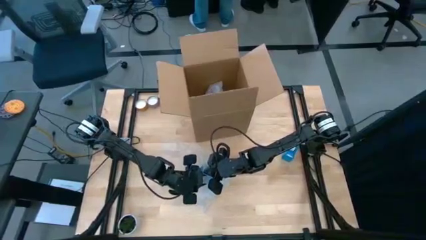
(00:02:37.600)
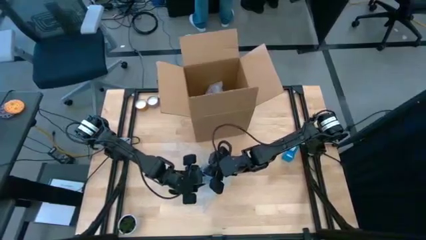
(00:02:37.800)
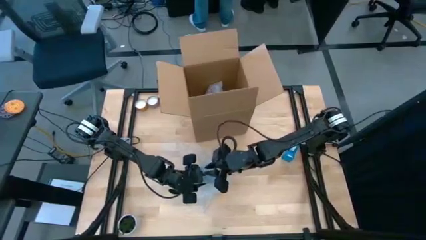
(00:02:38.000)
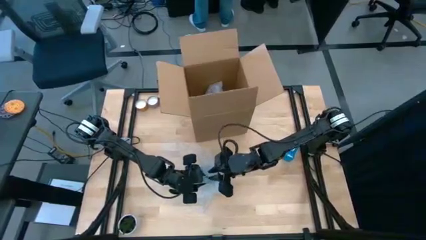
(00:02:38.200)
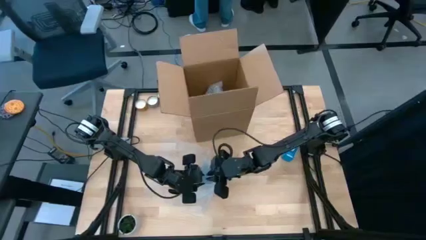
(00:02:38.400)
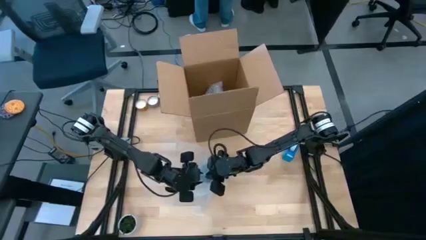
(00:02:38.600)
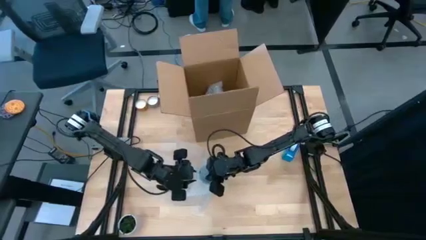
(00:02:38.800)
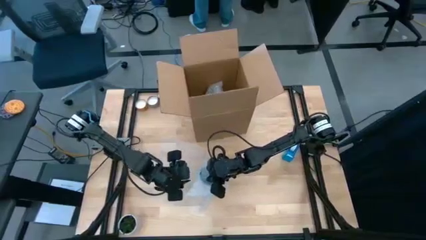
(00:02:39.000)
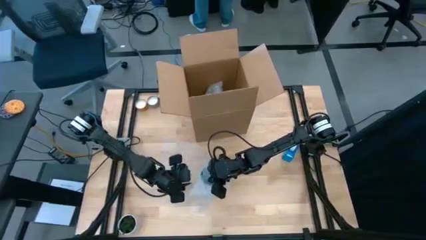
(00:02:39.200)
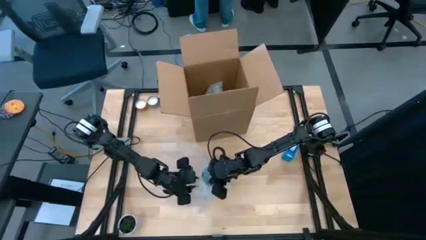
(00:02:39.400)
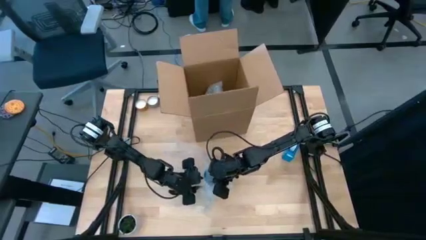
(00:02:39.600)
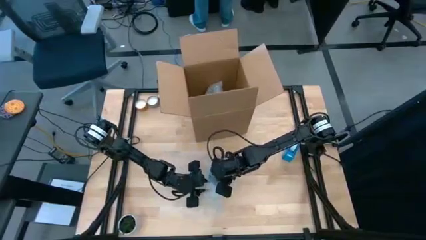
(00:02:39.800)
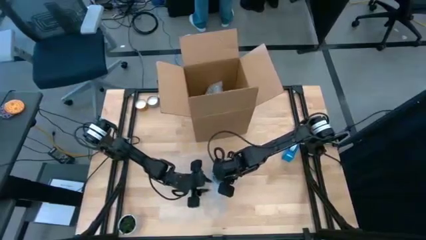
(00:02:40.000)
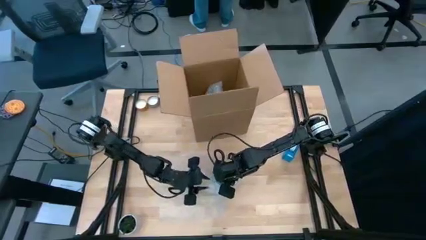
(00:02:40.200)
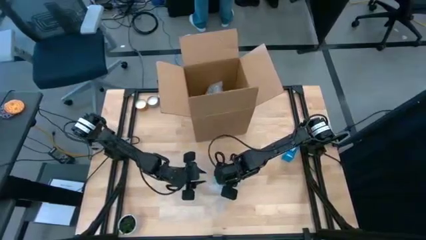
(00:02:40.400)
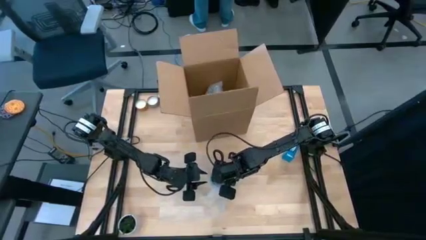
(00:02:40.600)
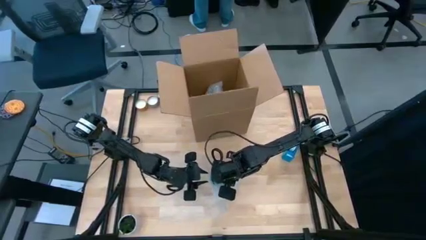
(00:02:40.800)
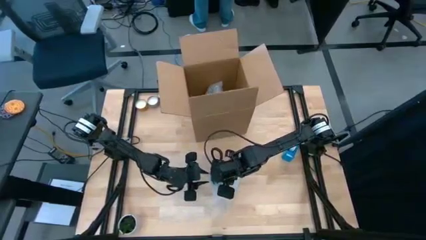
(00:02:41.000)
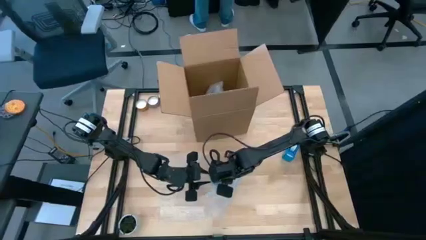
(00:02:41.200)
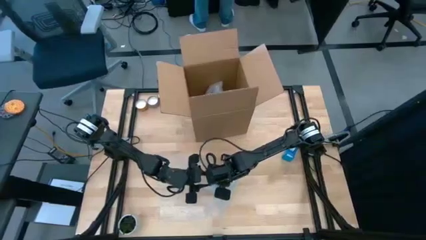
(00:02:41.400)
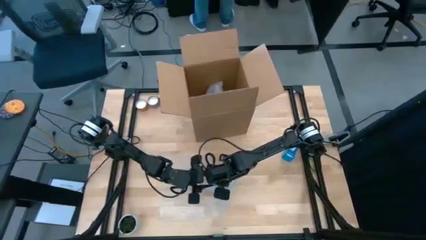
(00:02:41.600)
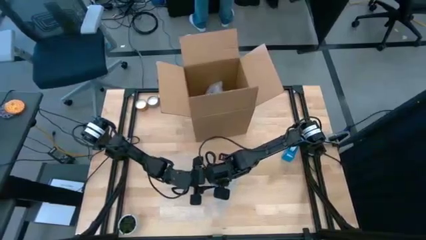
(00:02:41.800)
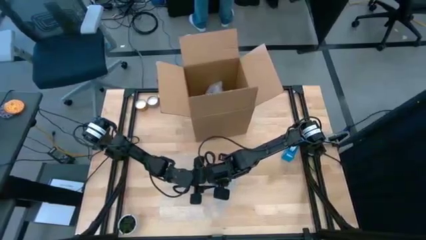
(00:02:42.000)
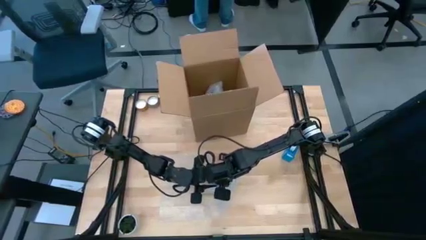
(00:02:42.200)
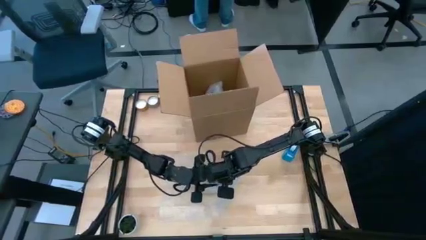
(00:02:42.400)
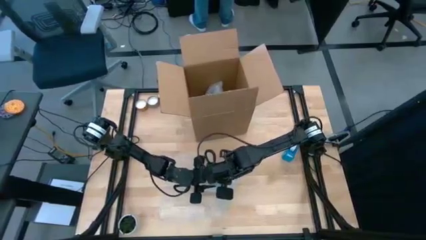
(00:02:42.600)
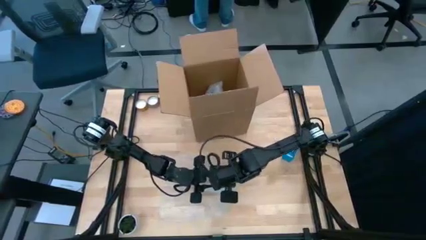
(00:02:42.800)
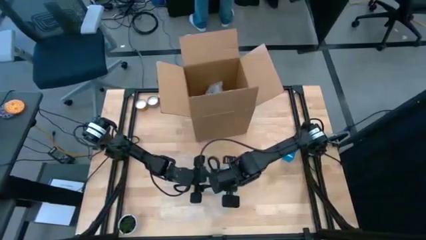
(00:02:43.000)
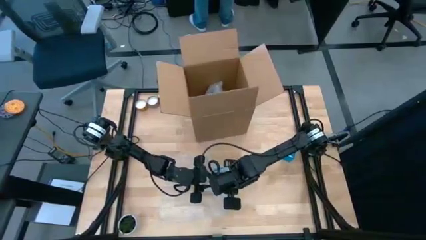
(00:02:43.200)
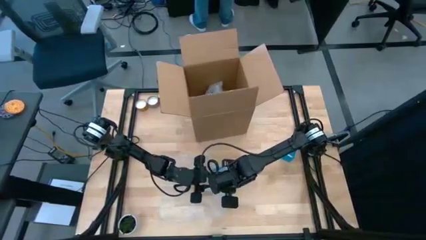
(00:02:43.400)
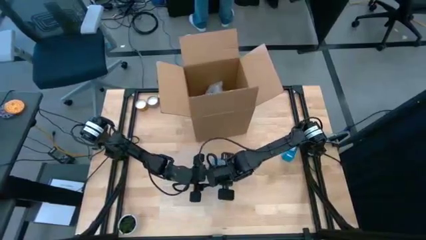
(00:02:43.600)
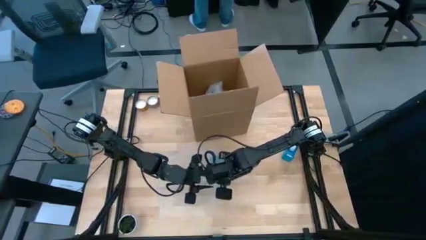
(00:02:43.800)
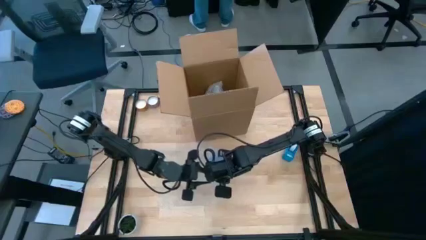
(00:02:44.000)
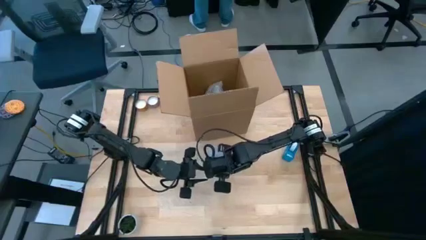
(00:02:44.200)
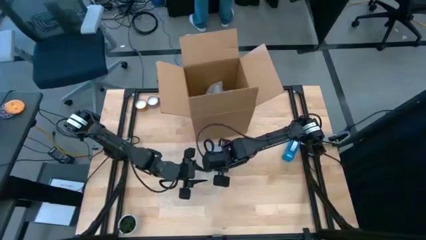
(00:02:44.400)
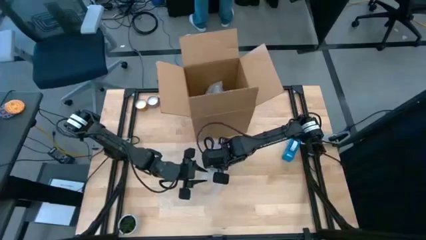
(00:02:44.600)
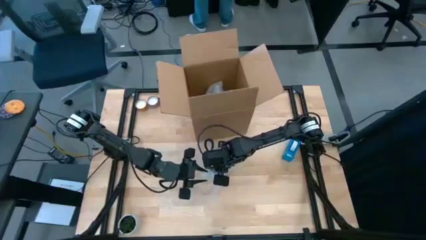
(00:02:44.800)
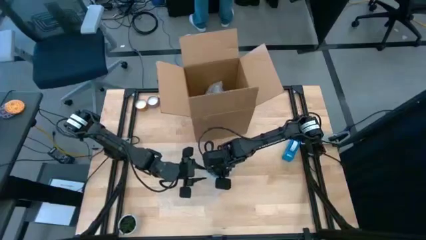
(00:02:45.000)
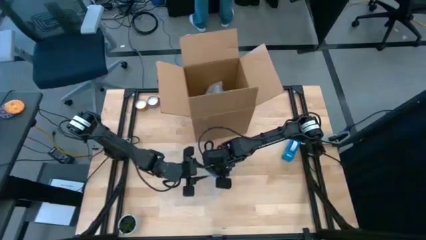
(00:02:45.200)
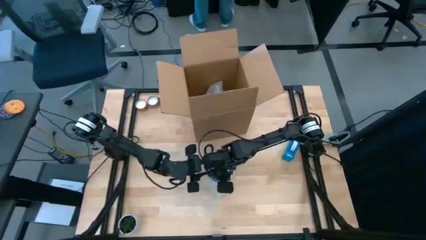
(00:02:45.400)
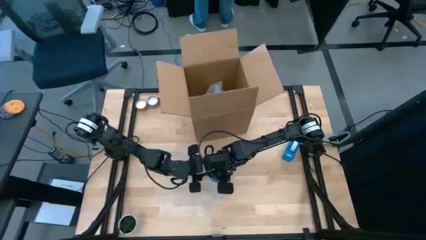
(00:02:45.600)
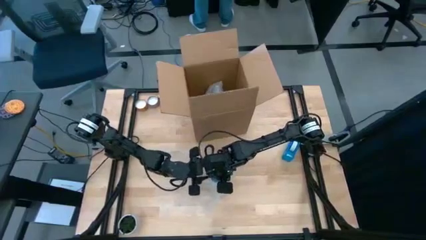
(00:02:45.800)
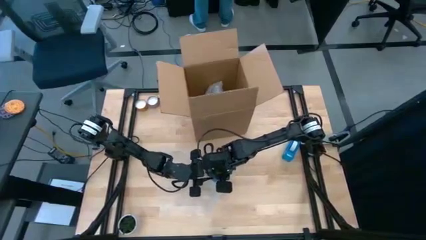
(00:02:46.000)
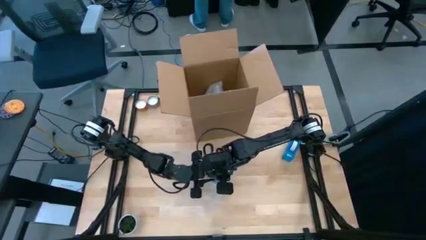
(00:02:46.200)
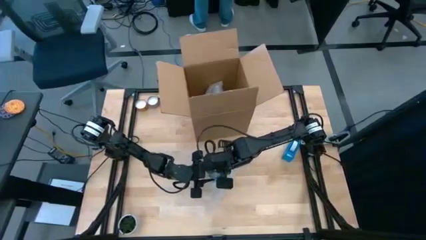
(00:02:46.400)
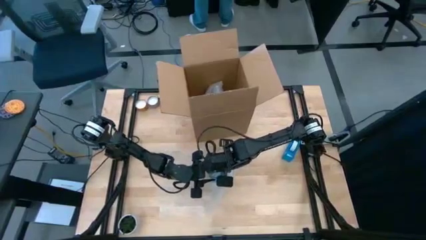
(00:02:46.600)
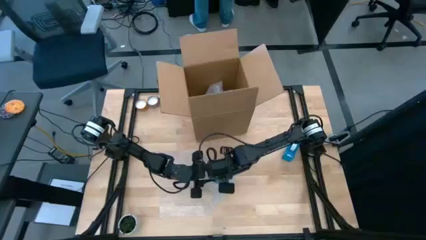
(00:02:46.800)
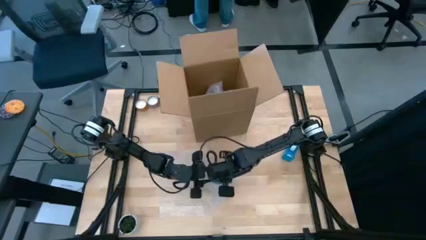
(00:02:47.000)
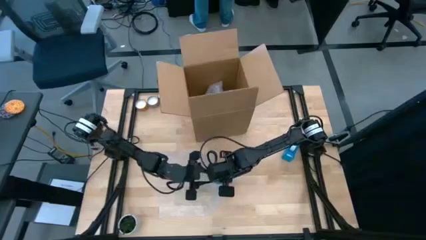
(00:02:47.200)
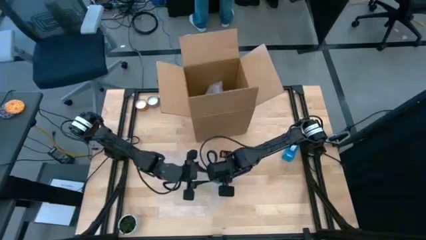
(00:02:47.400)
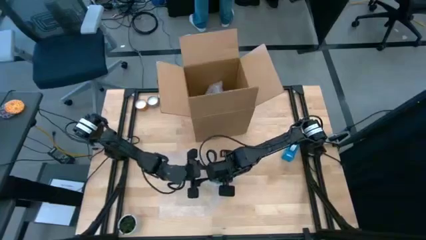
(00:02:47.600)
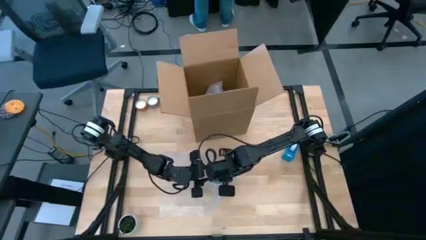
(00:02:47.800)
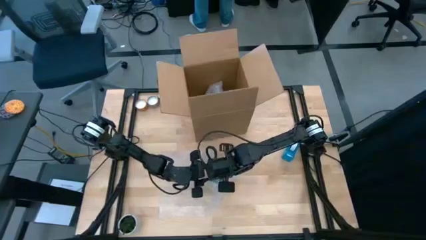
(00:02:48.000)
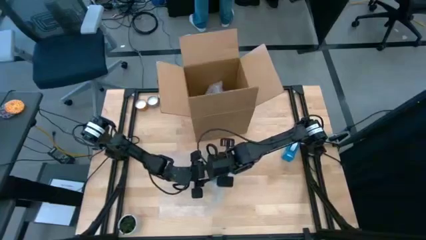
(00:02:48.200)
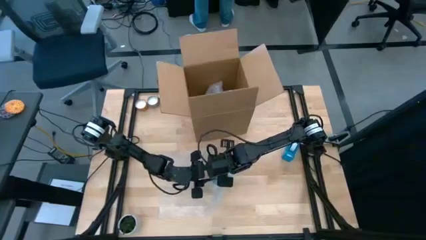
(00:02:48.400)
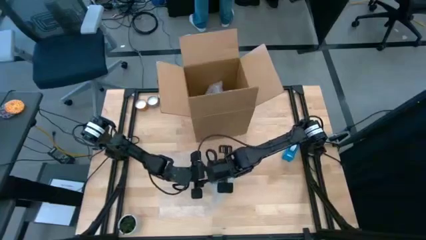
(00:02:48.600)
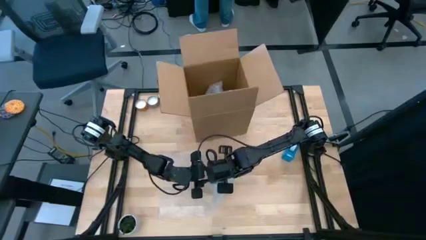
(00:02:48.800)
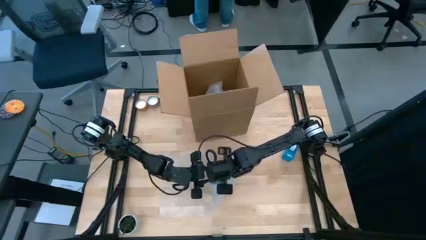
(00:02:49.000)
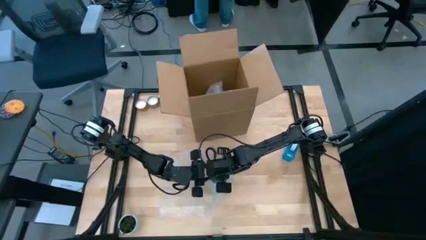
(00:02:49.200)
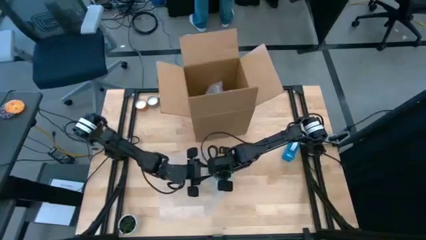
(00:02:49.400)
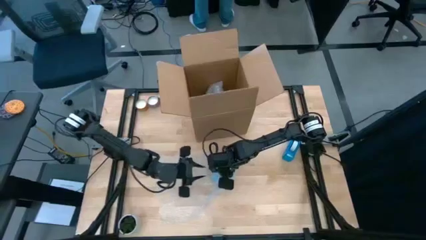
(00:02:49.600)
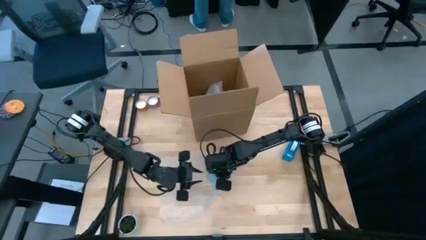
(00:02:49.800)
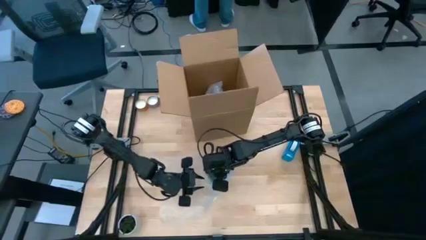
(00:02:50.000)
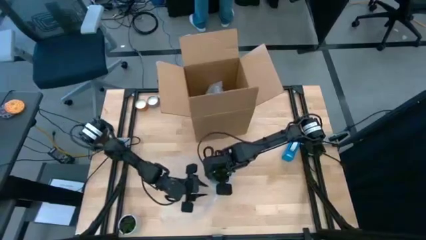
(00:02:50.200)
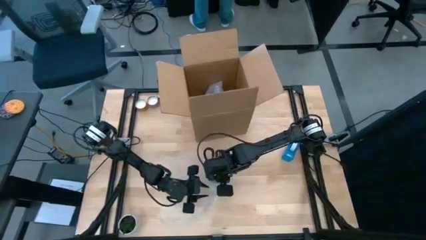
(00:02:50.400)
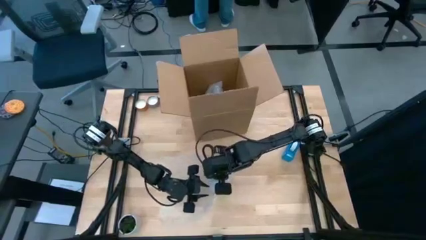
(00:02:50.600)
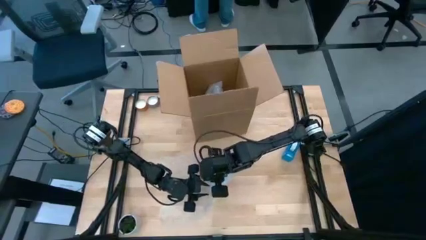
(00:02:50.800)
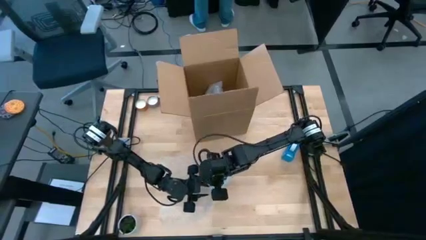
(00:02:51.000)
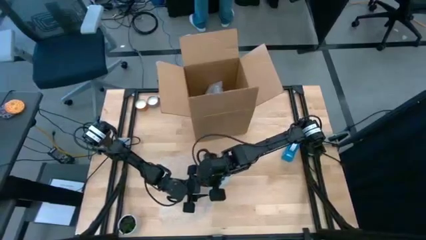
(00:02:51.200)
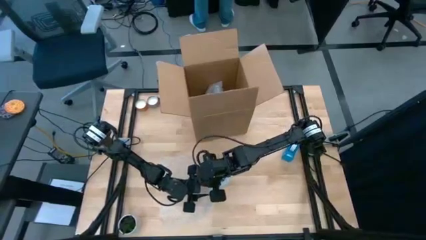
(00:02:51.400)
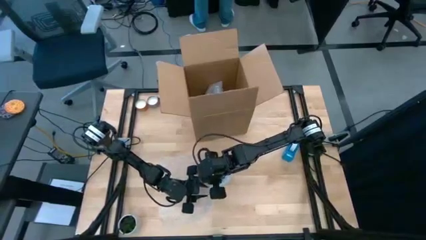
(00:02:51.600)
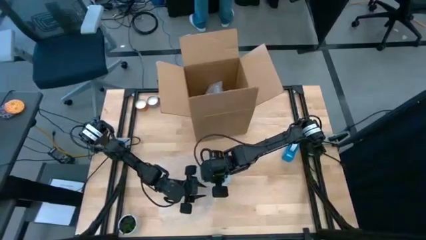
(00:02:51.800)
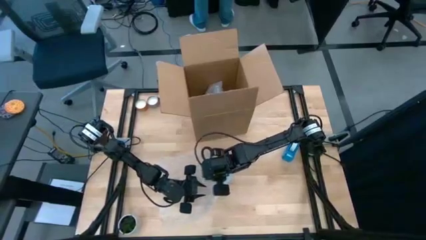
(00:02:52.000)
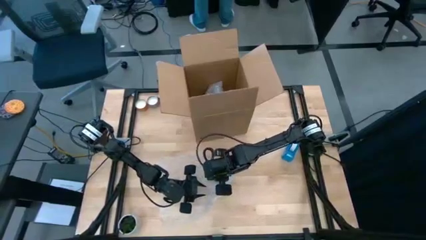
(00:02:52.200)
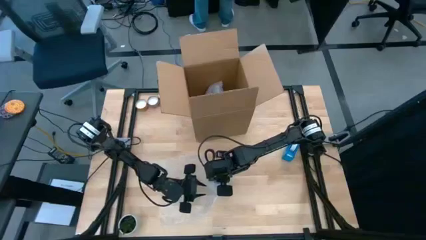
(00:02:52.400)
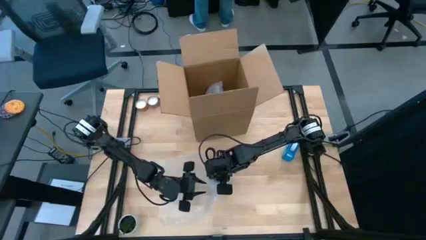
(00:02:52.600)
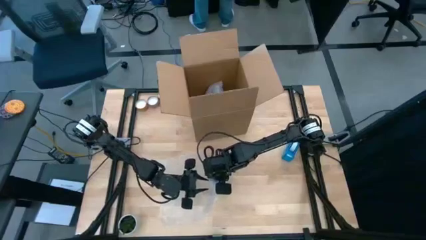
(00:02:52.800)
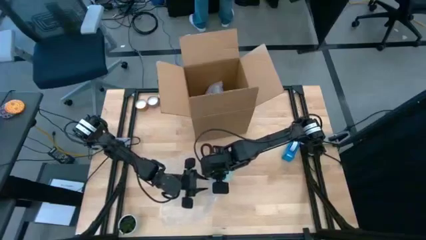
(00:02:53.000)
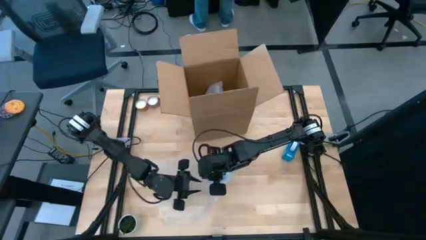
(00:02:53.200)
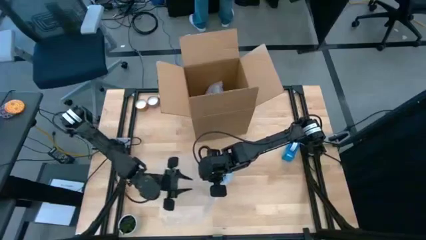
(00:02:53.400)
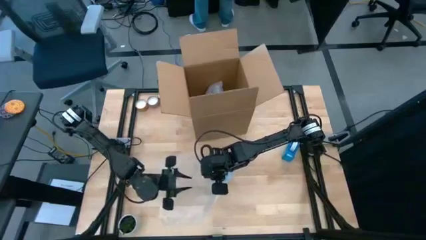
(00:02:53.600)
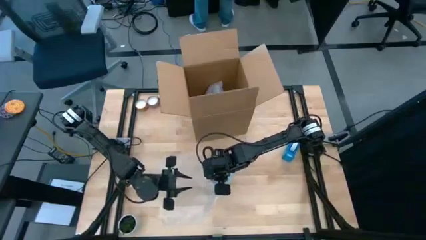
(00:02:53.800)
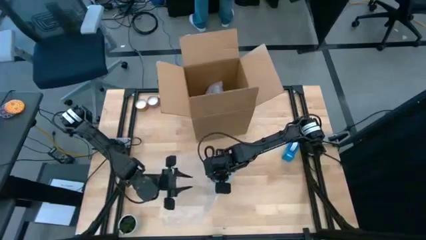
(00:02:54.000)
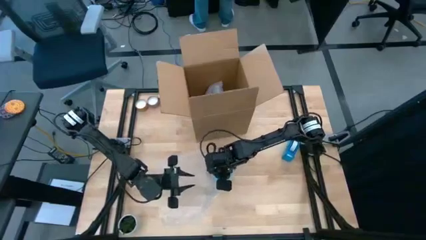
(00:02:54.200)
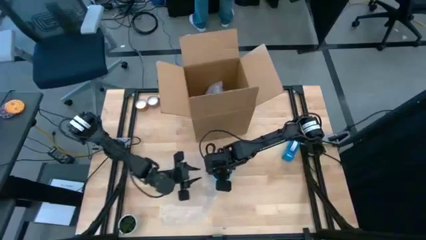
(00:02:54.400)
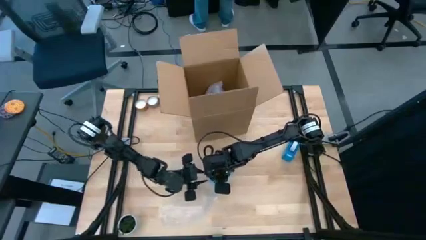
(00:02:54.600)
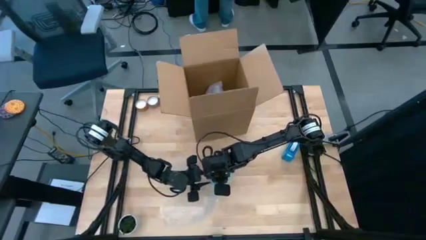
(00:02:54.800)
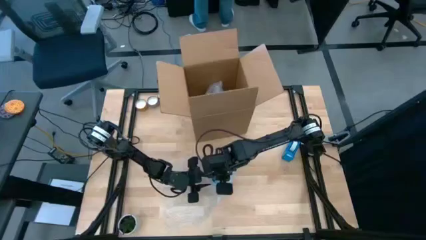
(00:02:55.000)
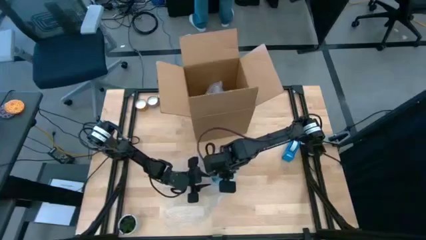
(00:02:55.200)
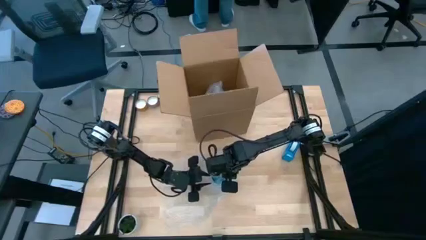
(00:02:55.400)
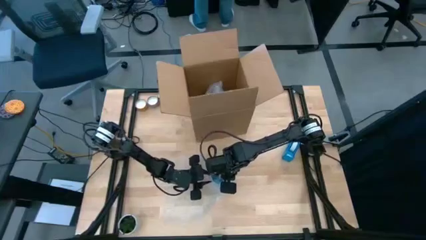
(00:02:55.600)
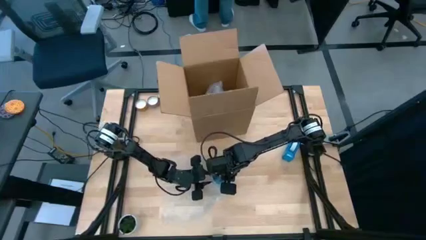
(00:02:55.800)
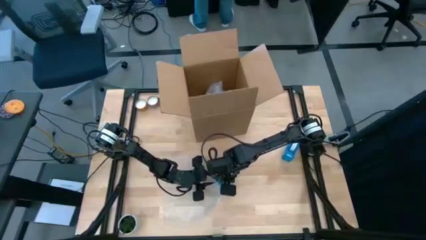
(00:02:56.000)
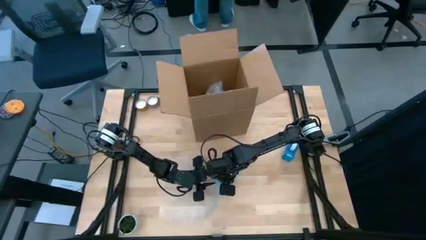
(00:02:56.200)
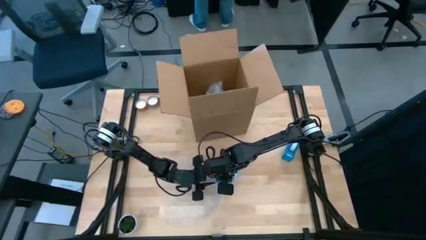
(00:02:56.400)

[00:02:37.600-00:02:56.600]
Task: wrap mug
Wrap the blue cup with bubble wrap
